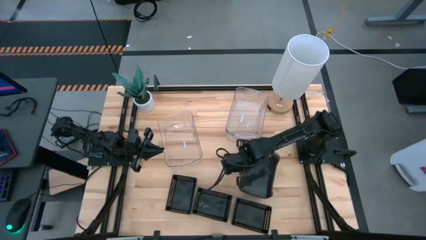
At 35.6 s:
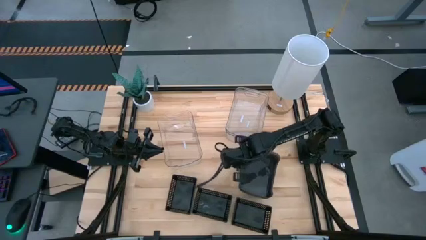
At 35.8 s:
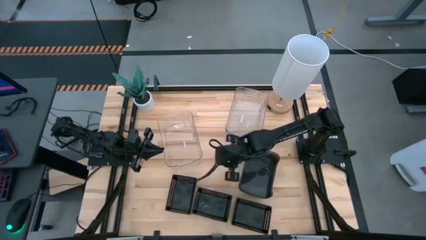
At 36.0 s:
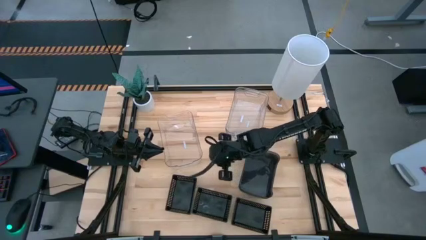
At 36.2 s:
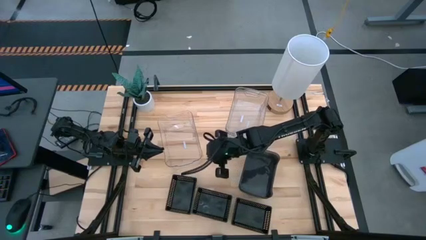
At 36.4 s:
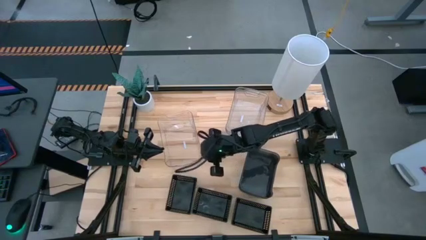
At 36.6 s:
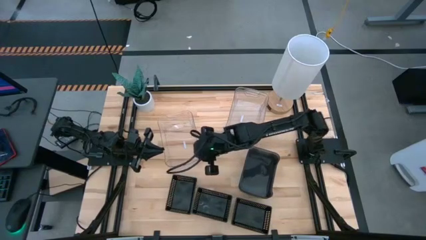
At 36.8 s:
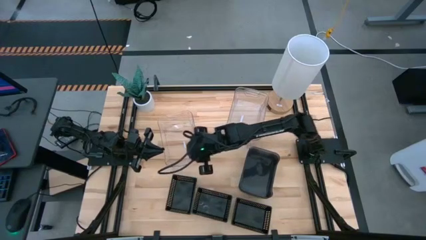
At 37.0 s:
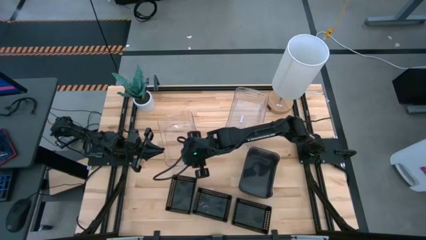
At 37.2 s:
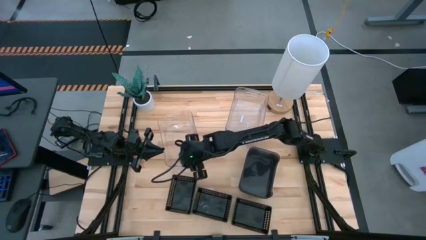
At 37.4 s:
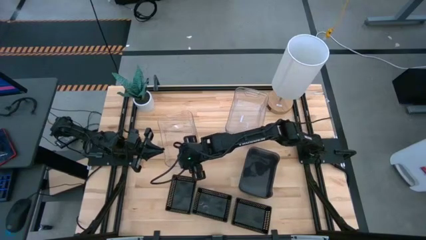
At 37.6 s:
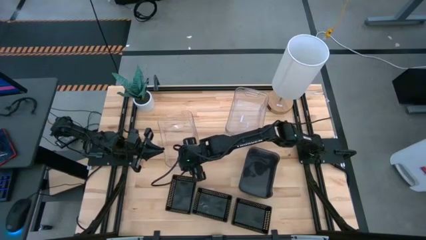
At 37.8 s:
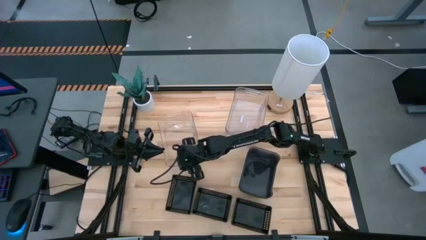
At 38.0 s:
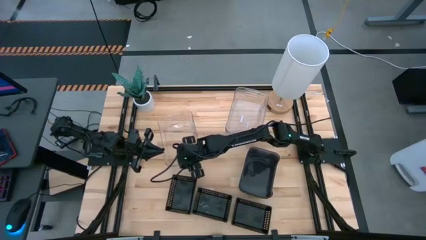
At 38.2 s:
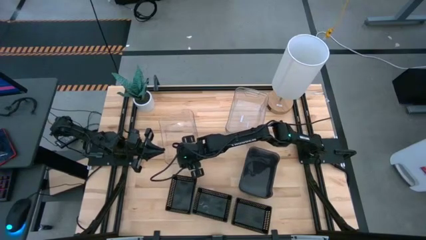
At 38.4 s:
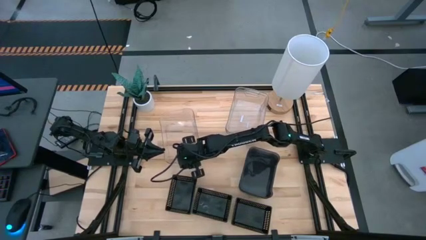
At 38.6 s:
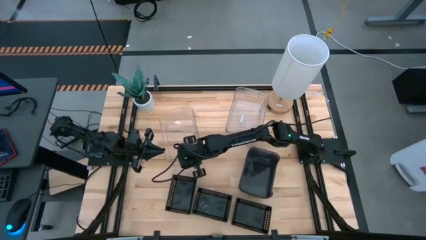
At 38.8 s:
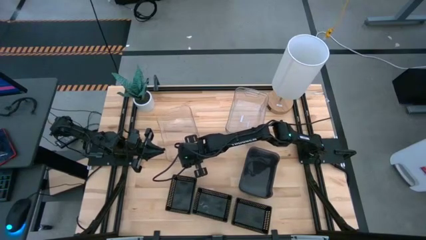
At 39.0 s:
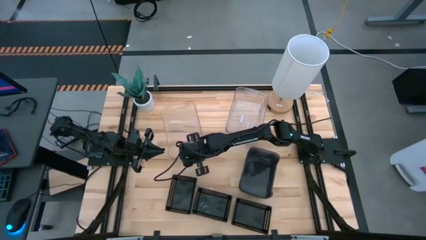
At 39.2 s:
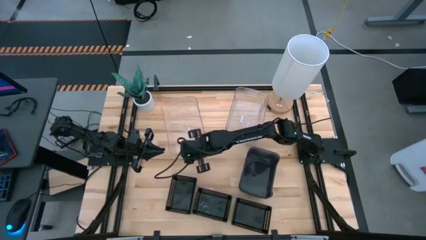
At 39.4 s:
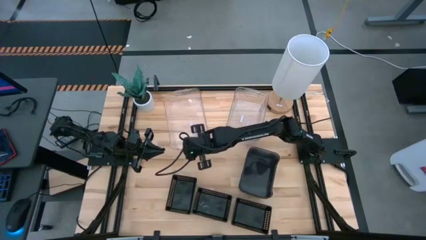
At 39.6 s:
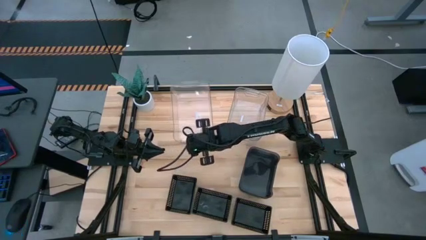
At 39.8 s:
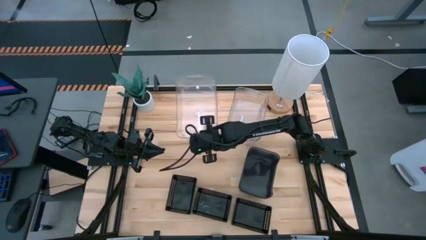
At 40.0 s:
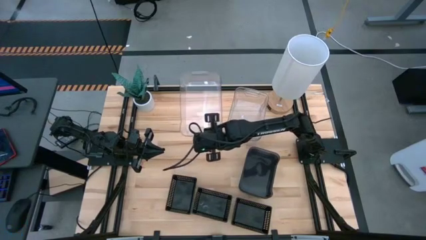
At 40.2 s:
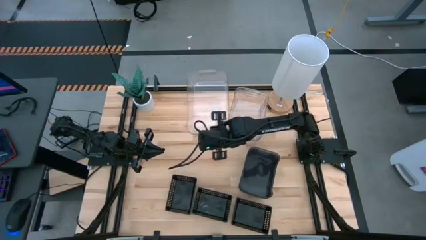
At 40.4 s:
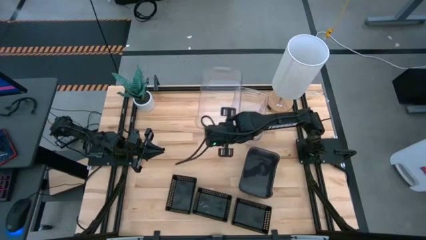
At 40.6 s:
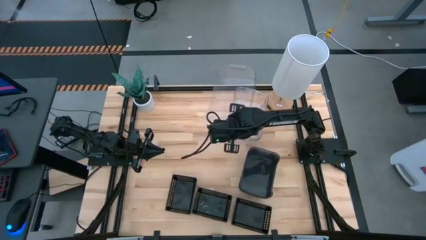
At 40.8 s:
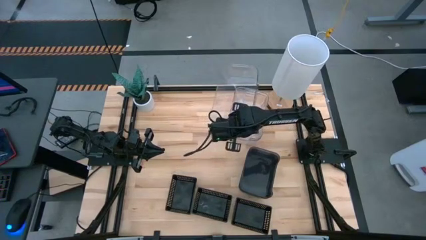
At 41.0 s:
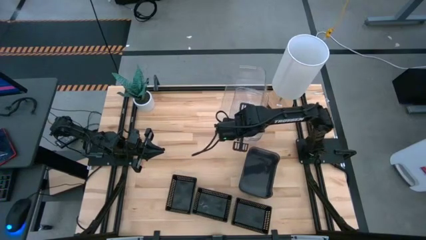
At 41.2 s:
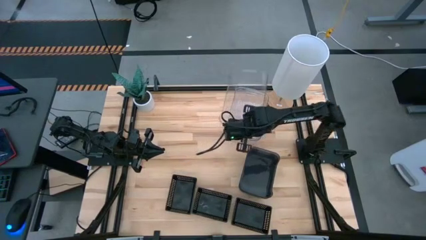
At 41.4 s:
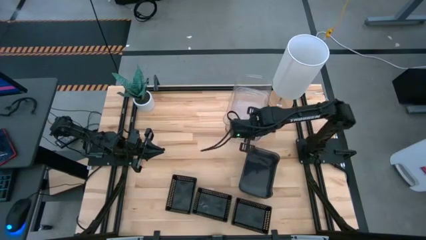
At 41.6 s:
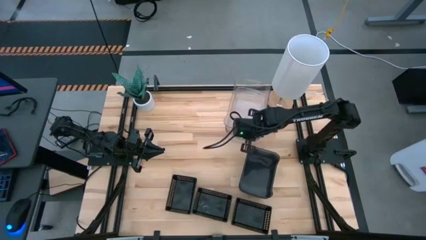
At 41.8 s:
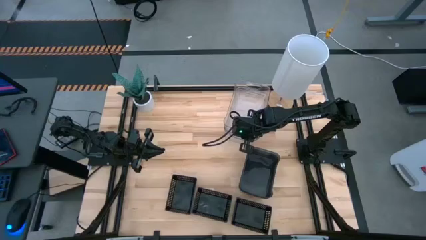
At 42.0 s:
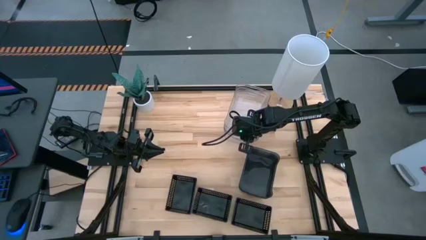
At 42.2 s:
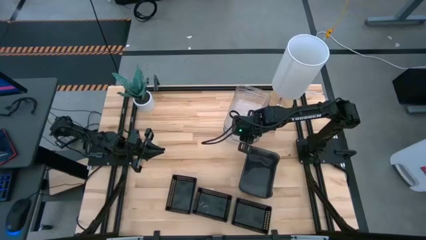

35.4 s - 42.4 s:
Stack the left transparent black bin on top of the right transparent black bin

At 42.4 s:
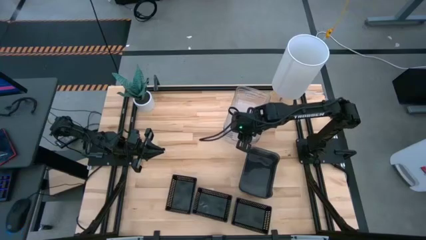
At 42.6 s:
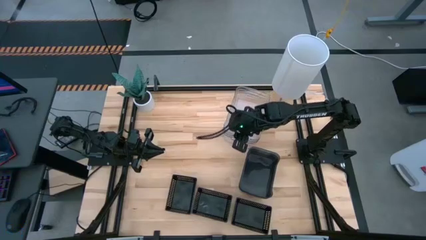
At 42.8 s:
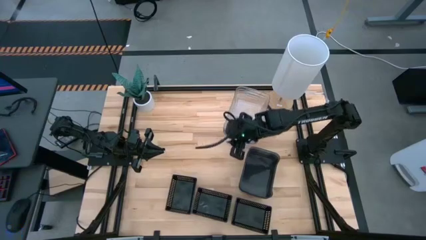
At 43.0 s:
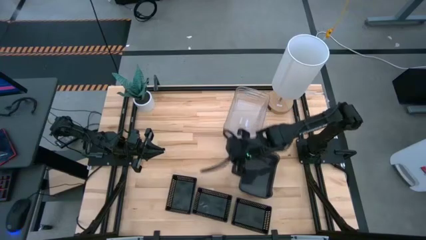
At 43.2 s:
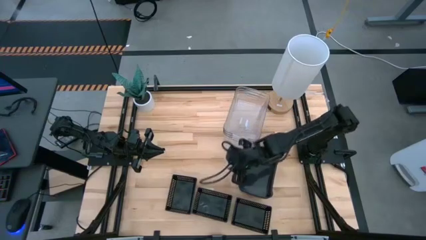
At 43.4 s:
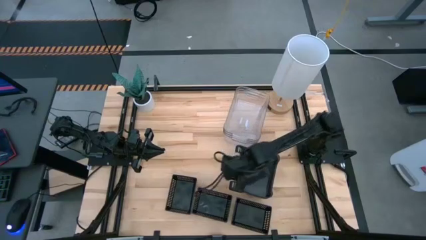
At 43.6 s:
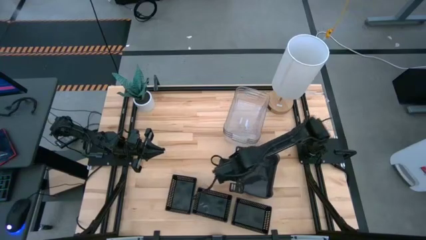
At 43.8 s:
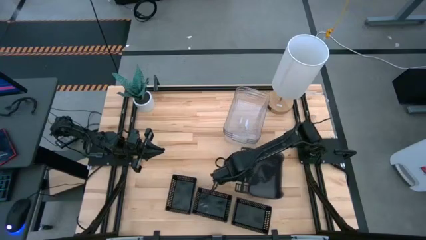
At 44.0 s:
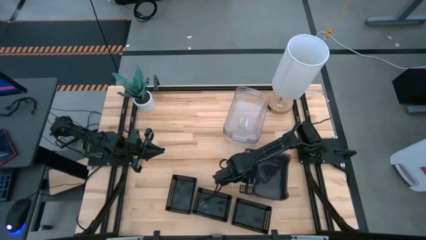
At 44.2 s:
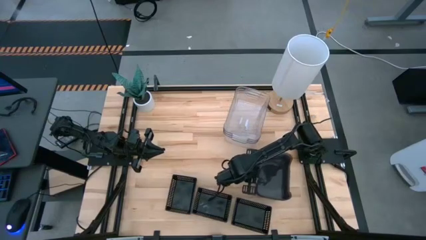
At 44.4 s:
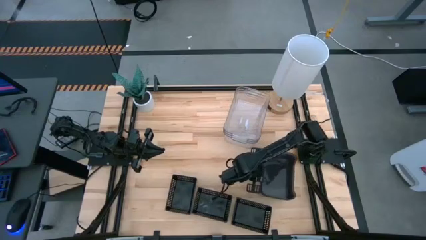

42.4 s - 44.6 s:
Adjust the stacked transparent black bin

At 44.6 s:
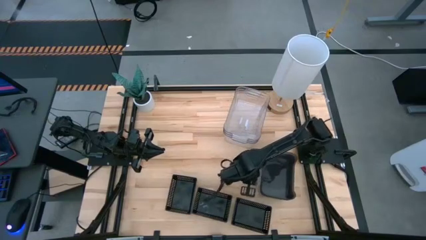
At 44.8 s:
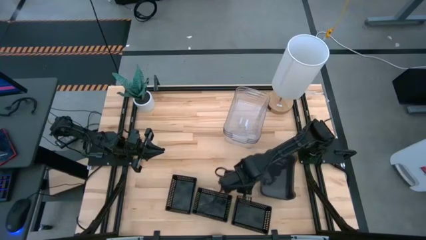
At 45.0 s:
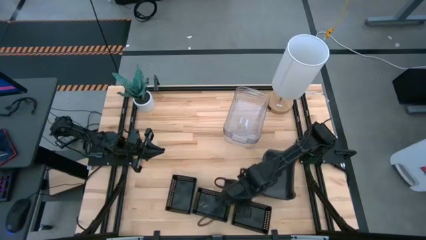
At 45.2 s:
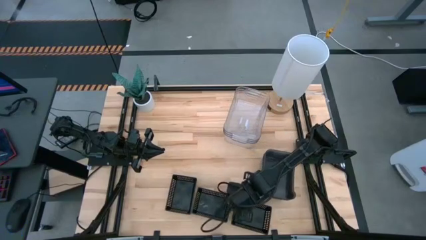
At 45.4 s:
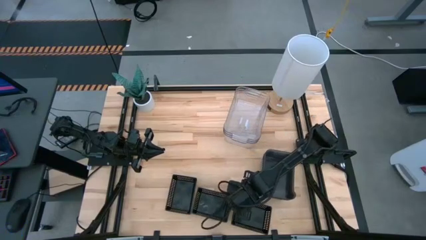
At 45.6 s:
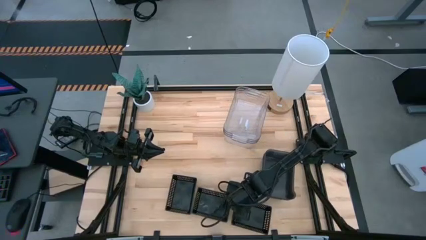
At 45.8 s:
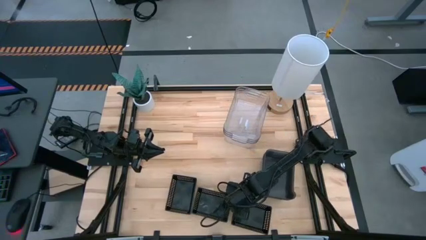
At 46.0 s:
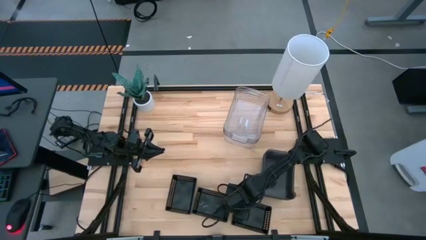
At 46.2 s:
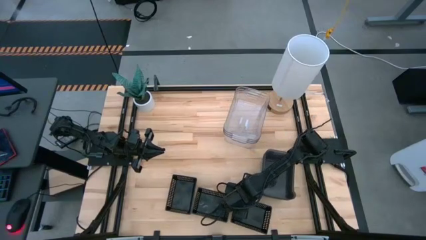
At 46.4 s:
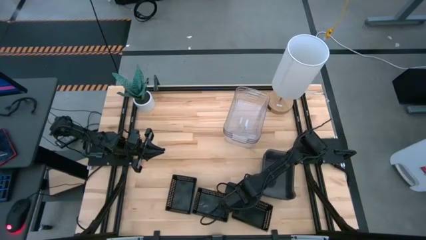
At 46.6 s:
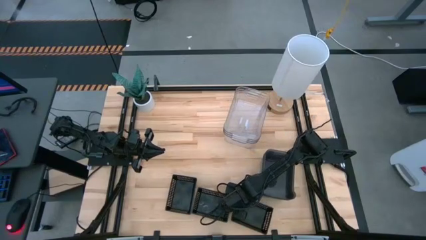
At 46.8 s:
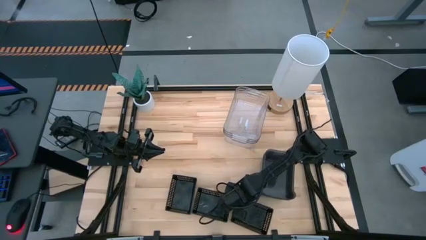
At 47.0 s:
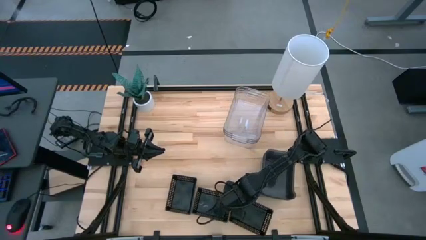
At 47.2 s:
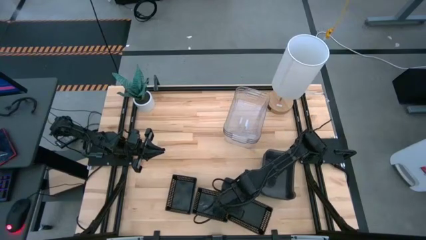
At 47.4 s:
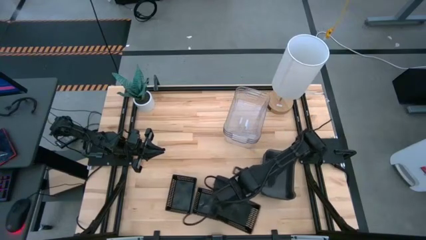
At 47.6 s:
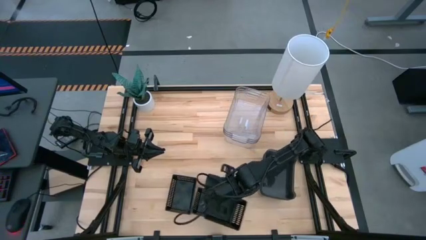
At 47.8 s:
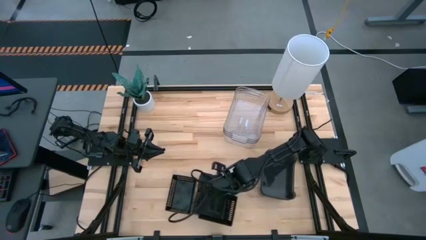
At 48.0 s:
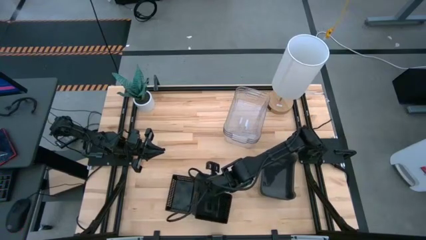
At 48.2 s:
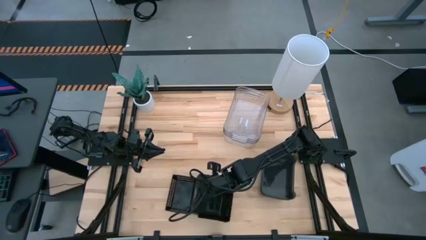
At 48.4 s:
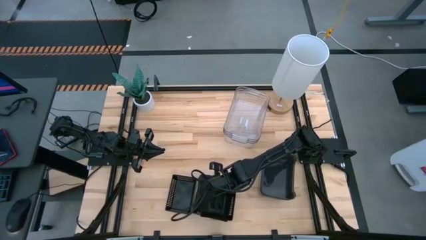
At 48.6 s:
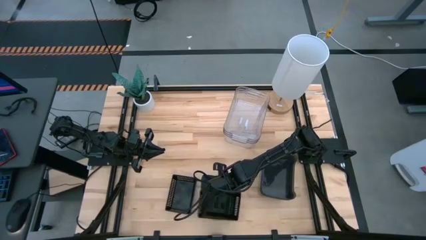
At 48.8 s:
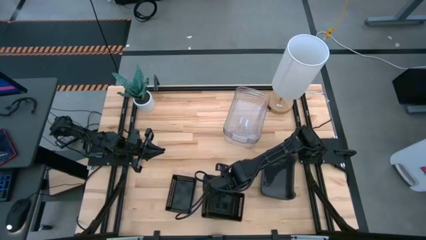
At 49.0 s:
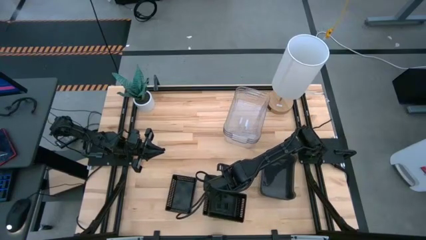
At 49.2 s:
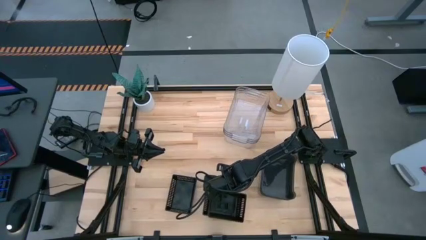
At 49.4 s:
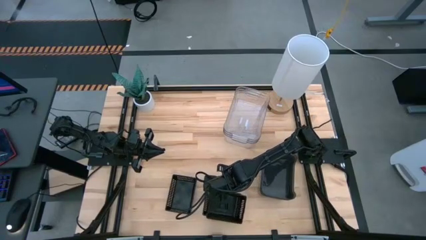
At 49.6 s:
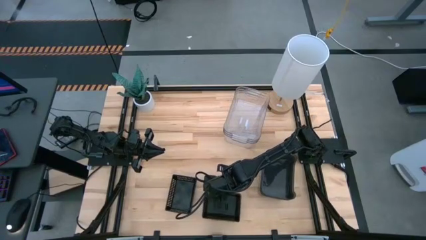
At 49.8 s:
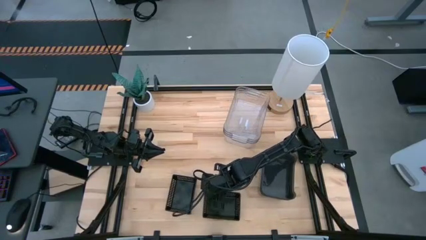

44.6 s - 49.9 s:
Stack the right black basket on top of the middle black basket
